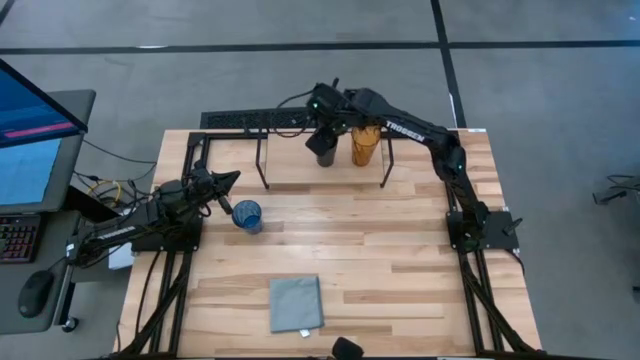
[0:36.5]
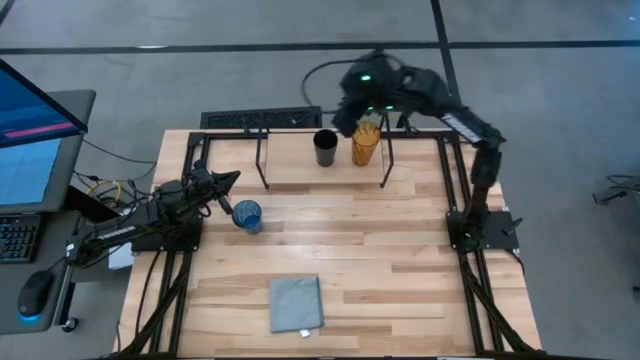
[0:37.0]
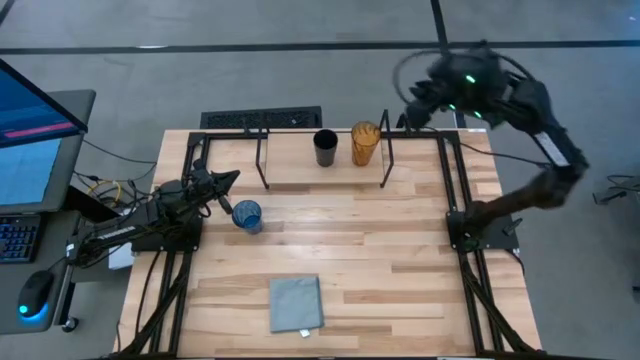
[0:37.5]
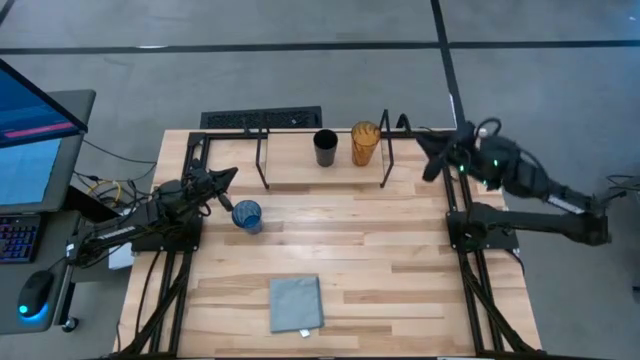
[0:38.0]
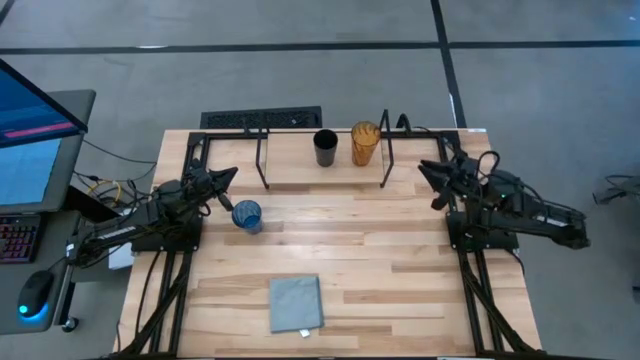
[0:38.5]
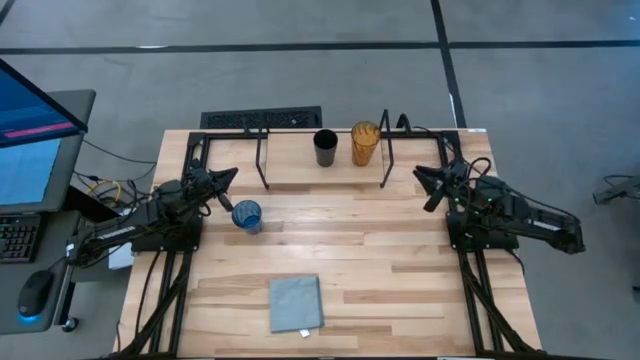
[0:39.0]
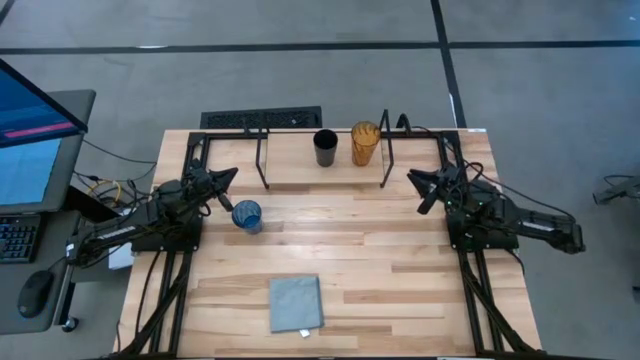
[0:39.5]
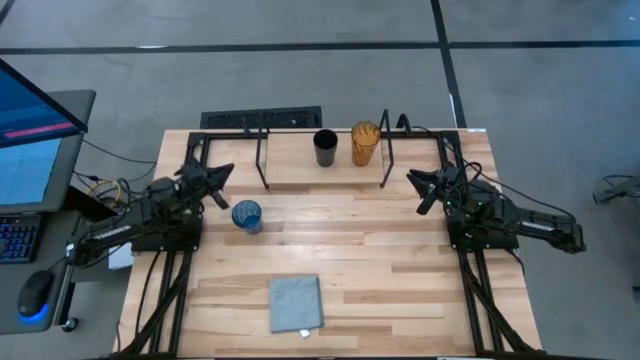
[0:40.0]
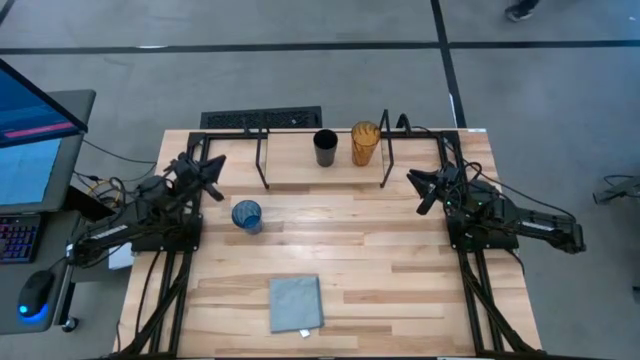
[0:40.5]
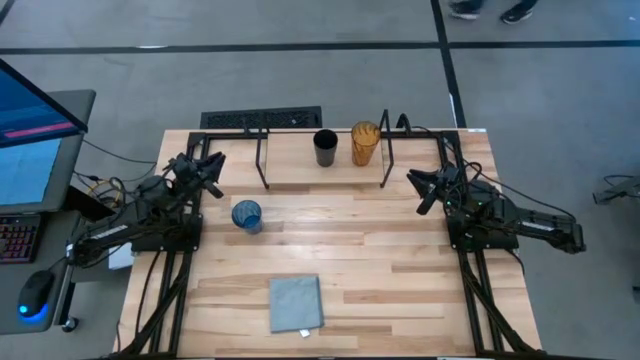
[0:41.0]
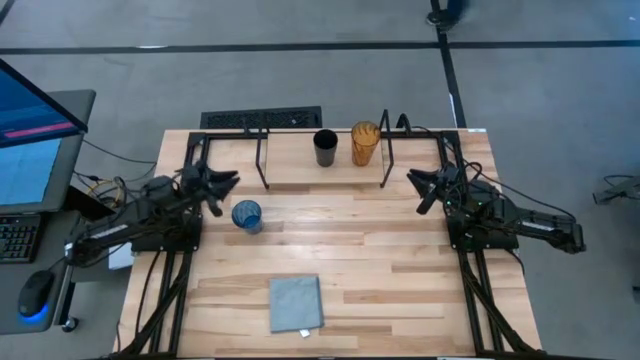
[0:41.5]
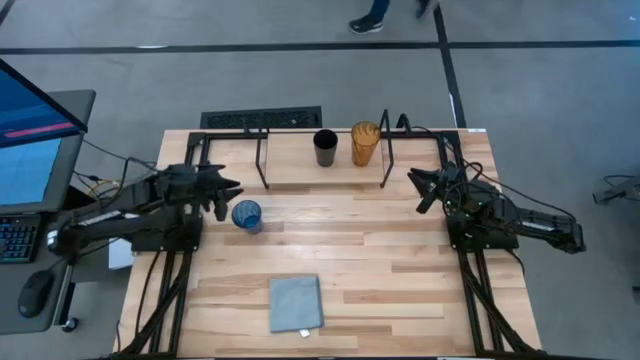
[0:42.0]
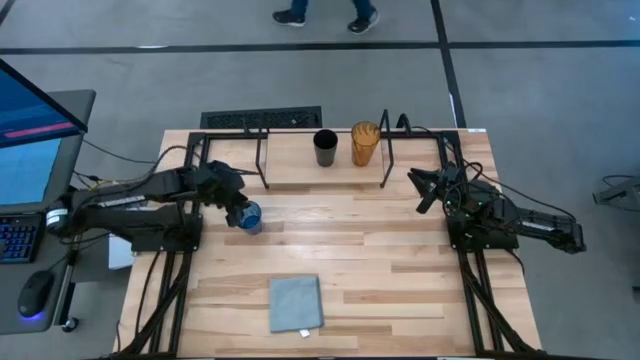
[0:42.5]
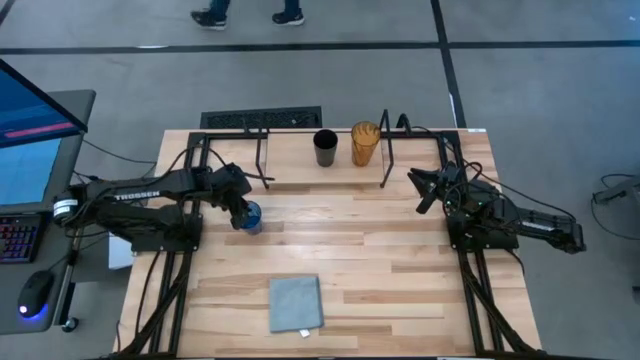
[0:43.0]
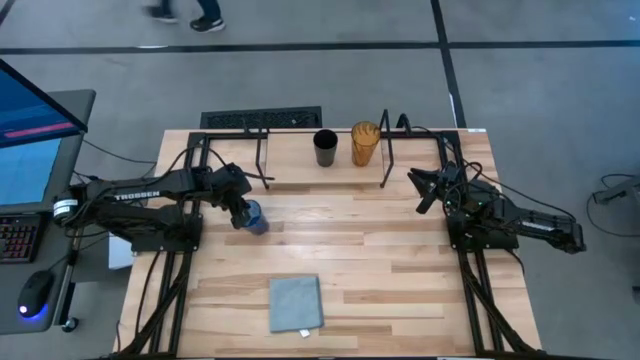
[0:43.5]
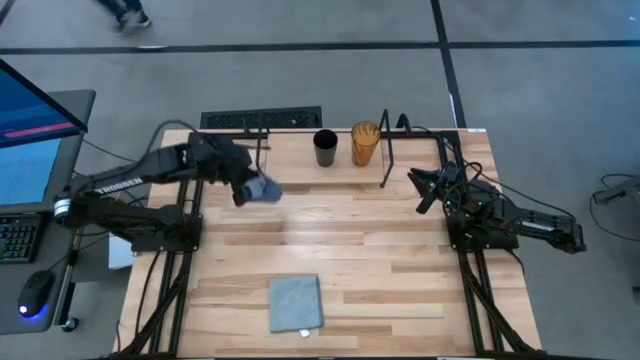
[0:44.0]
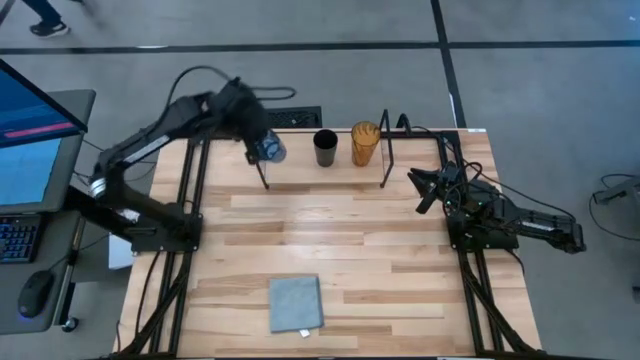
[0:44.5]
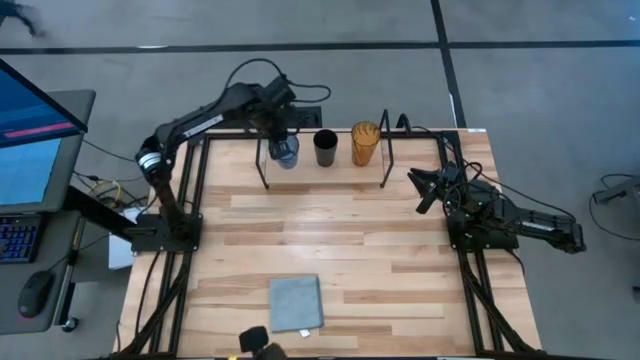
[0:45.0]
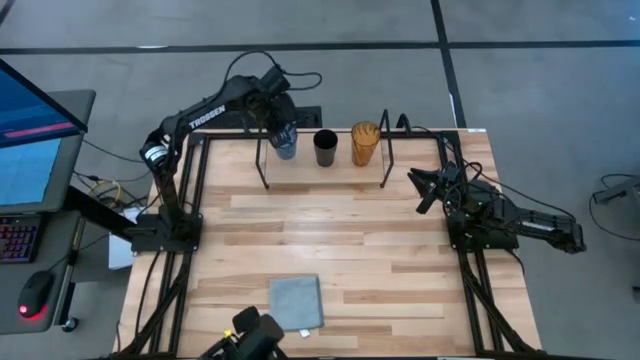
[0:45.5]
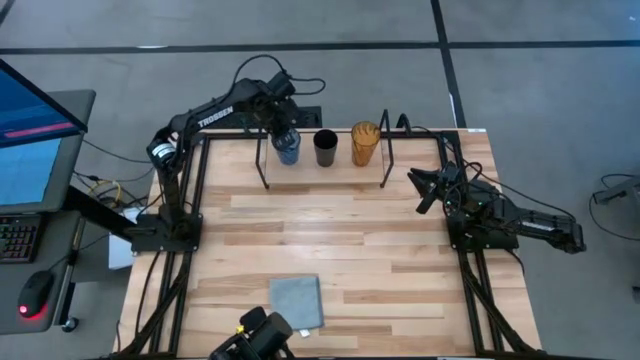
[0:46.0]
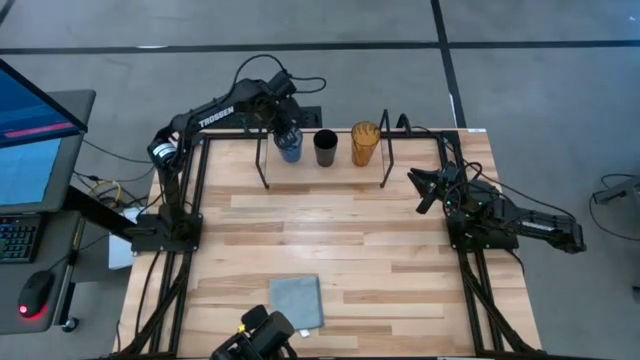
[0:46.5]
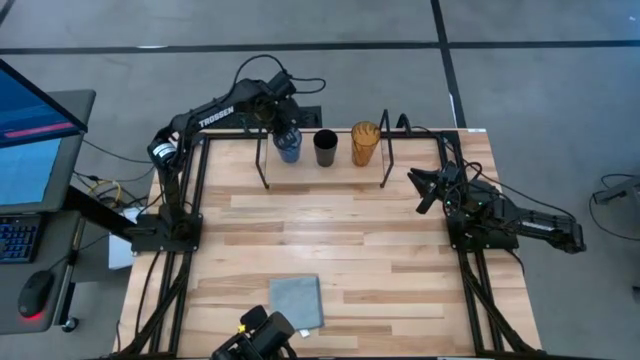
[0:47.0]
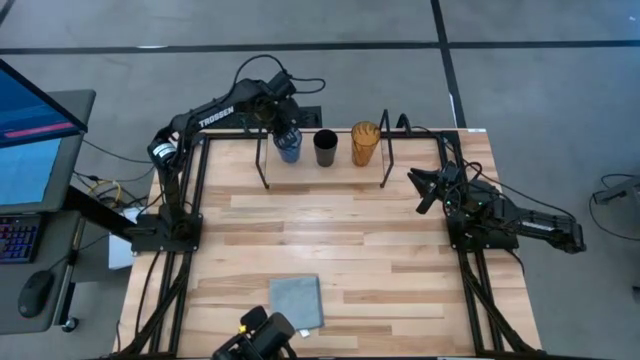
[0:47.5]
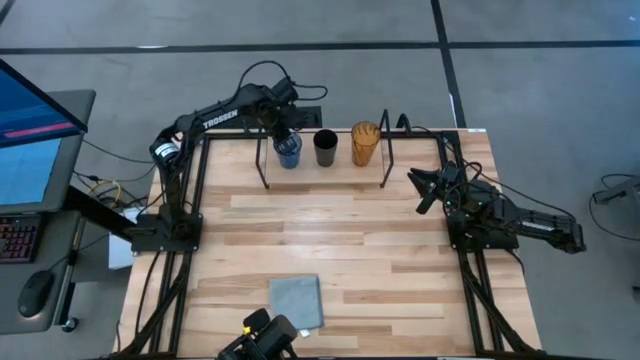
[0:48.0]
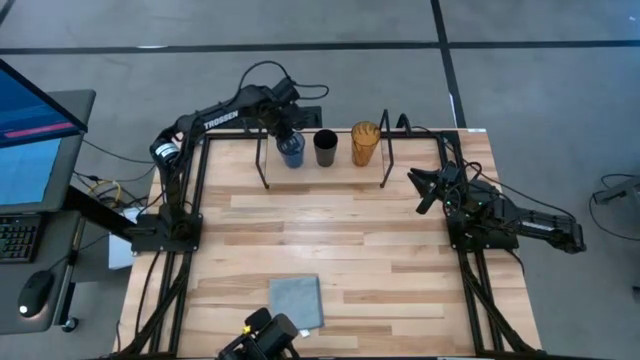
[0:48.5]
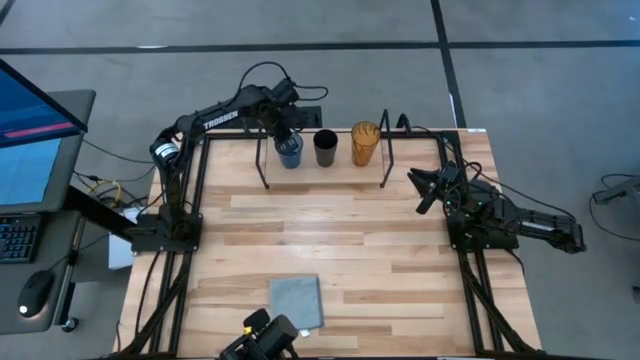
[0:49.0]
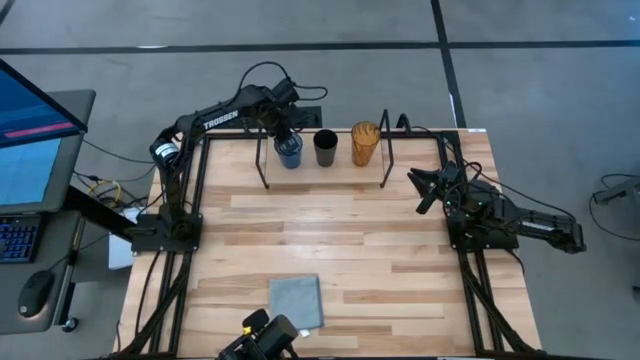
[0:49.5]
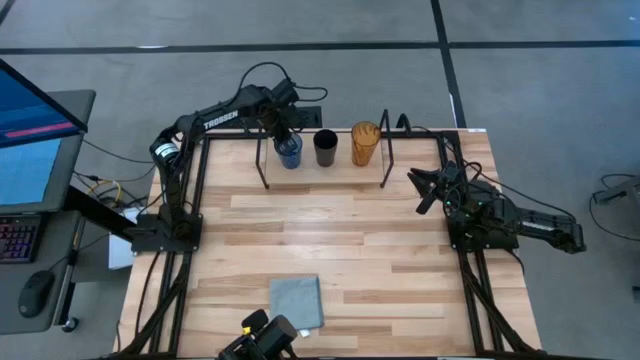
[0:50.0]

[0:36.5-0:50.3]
Task: Stack small to large cups/mugs on shelf
Put the blue glass on the shelf

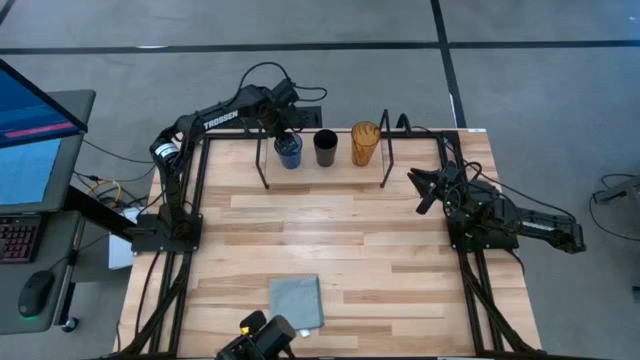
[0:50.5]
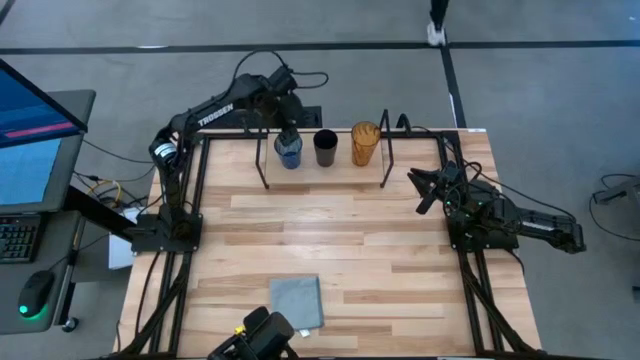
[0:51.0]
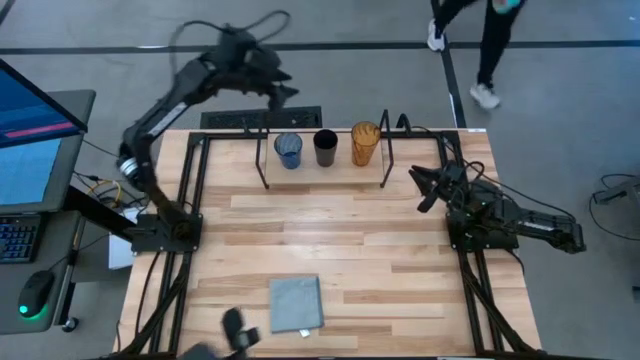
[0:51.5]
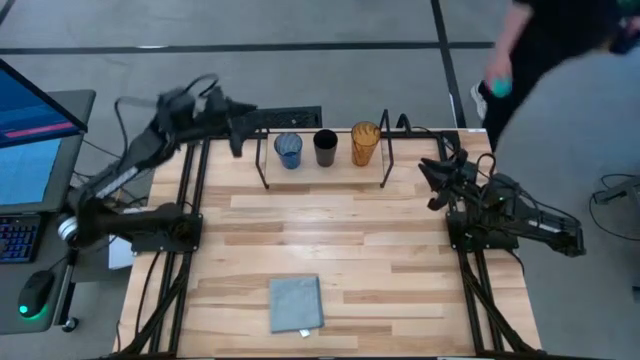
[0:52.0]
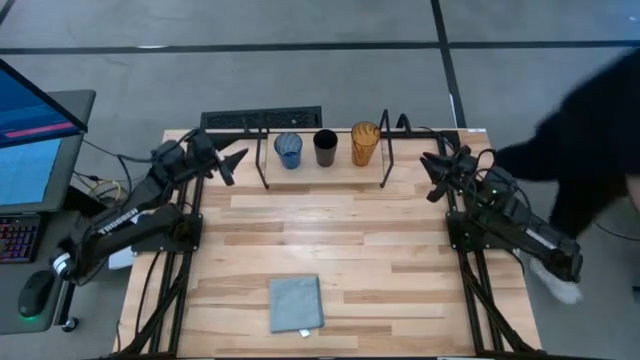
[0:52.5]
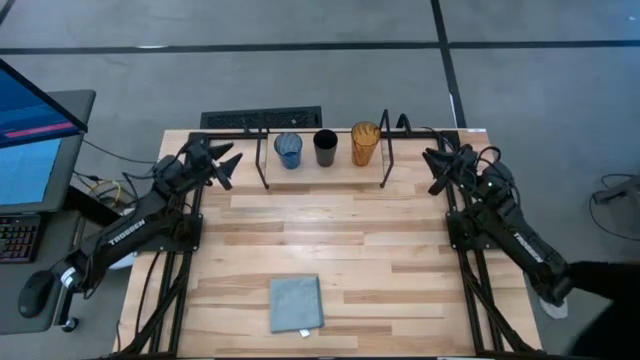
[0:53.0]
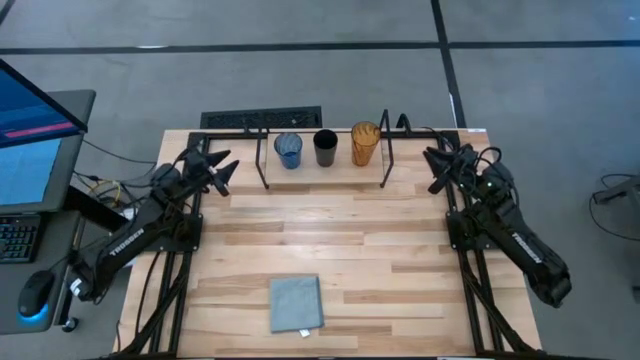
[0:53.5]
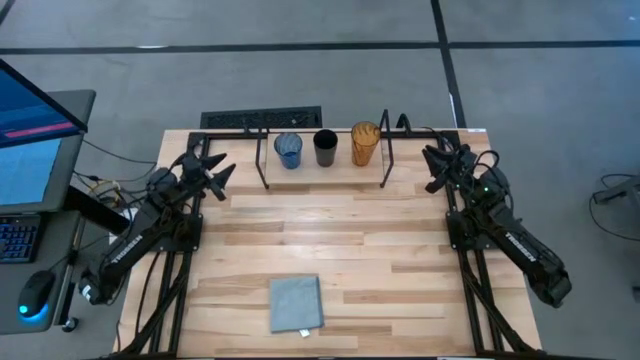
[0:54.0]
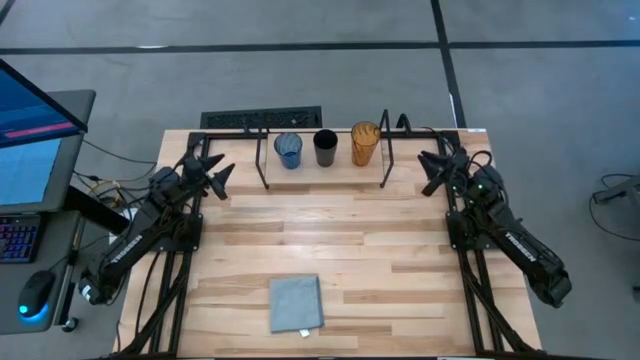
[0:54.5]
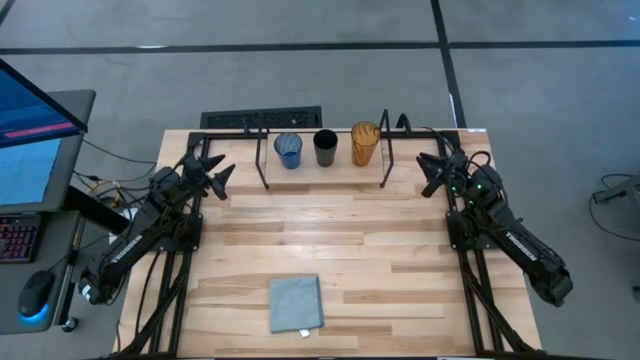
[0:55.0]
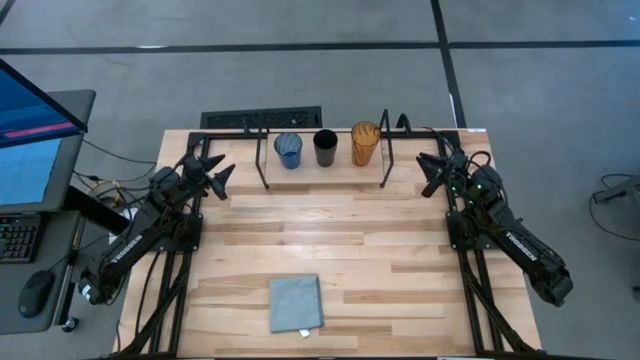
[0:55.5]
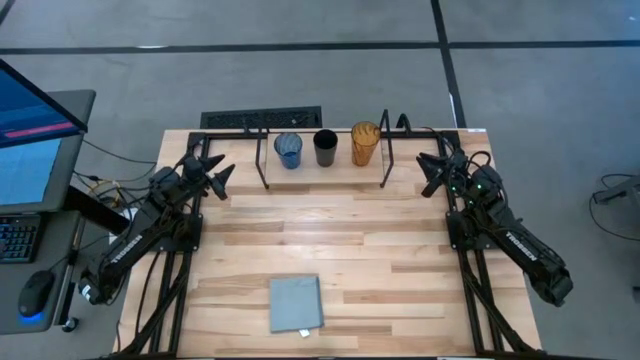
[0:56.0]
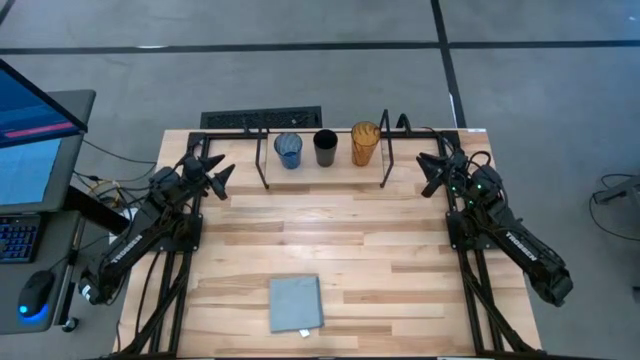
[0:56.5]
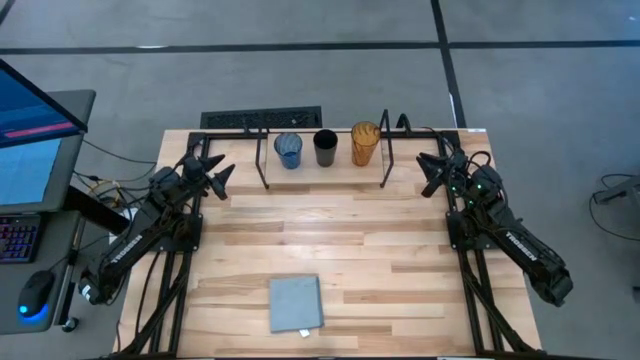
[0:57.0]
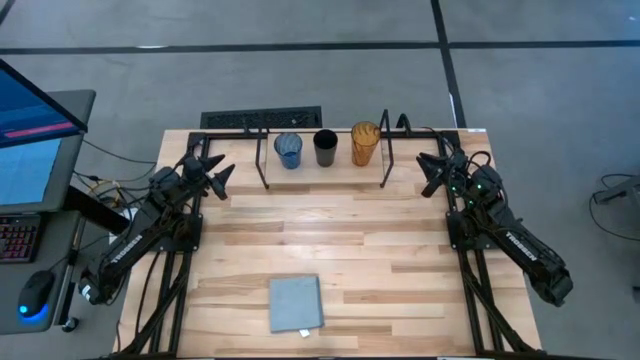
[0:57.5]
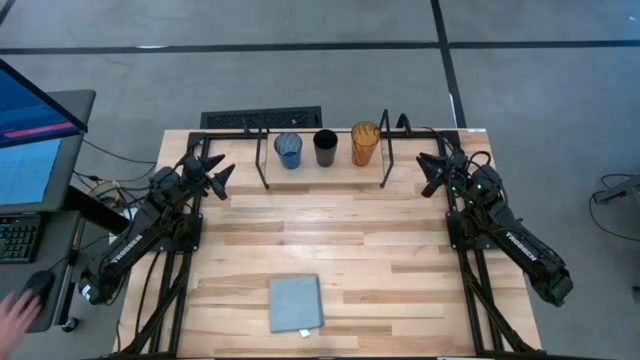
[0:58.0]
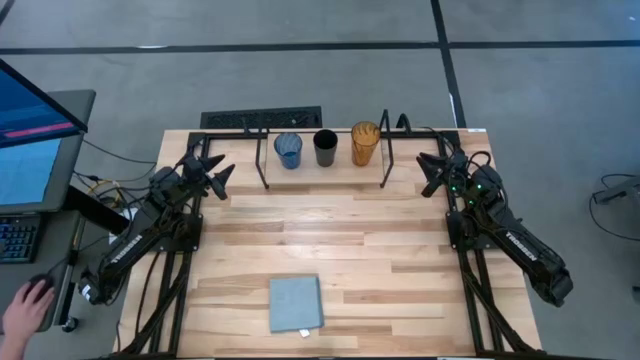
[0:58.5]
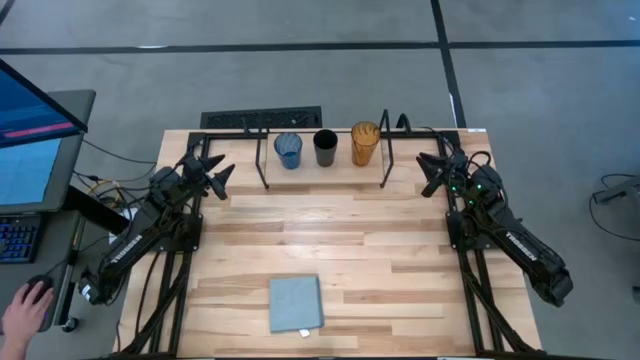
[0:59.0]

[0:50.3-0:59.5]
Return to Home Position
